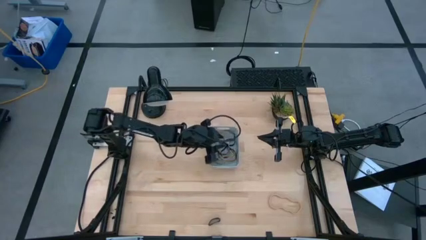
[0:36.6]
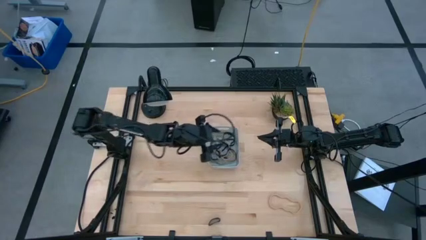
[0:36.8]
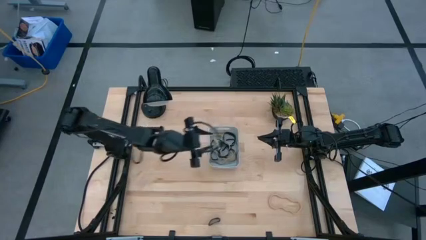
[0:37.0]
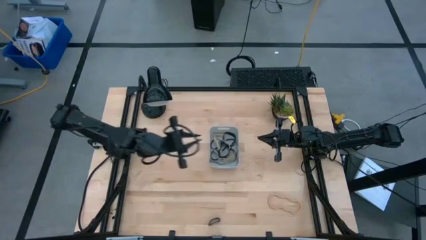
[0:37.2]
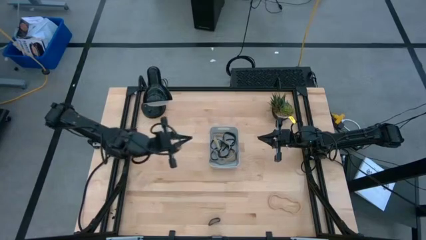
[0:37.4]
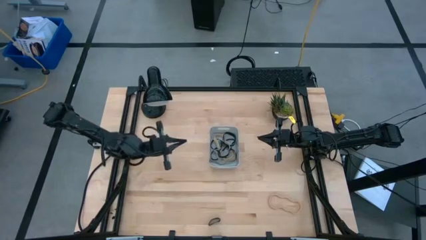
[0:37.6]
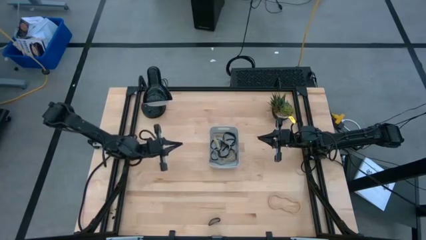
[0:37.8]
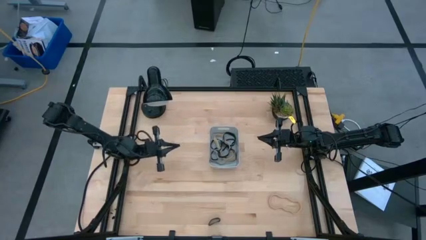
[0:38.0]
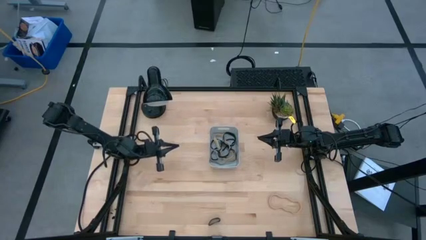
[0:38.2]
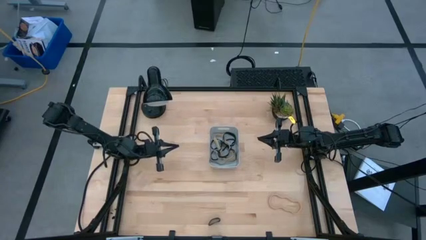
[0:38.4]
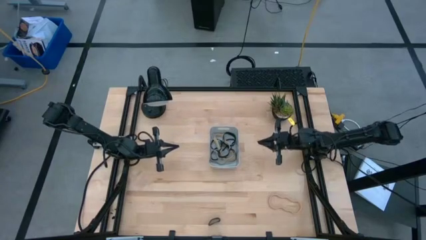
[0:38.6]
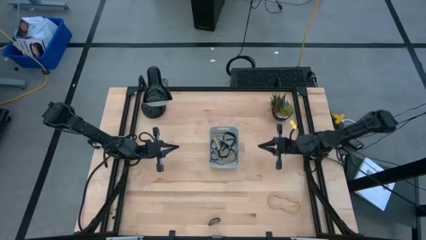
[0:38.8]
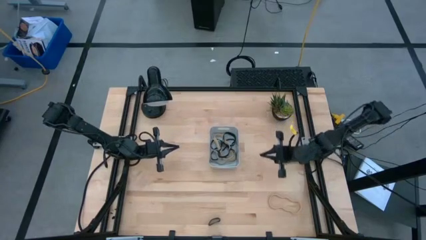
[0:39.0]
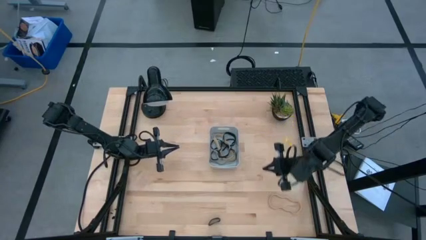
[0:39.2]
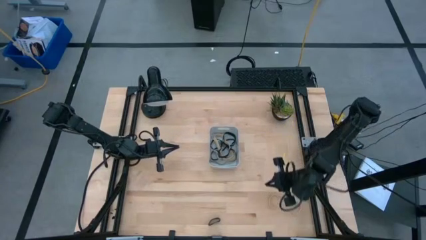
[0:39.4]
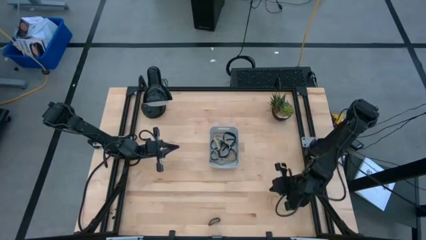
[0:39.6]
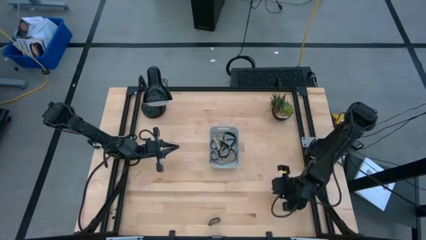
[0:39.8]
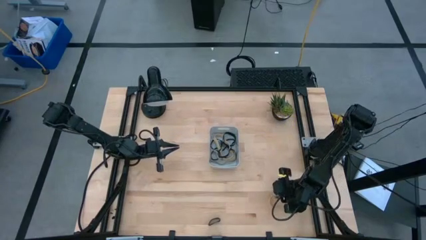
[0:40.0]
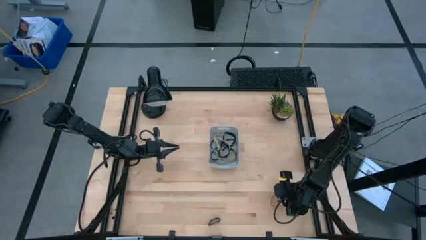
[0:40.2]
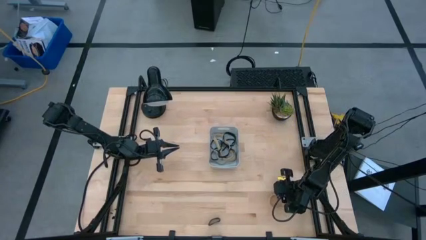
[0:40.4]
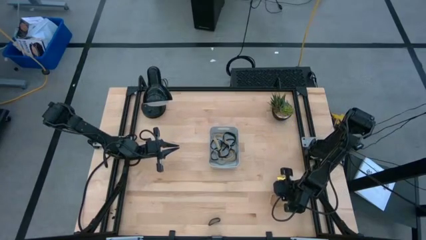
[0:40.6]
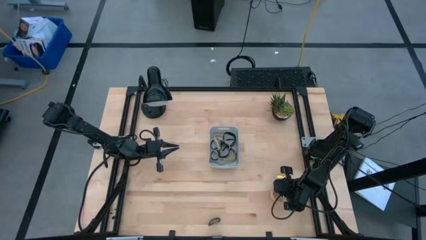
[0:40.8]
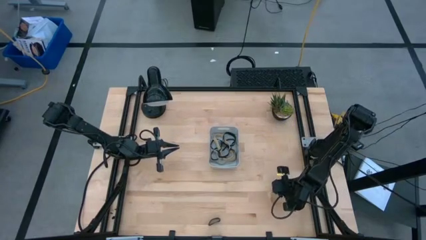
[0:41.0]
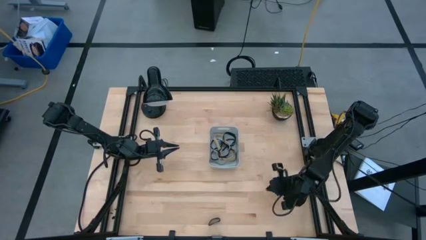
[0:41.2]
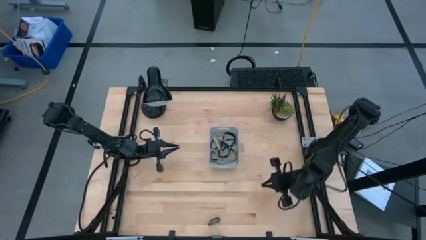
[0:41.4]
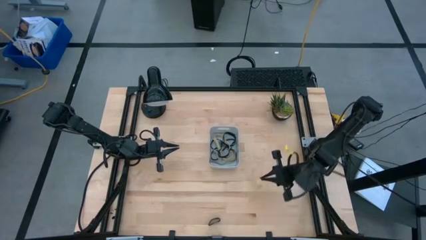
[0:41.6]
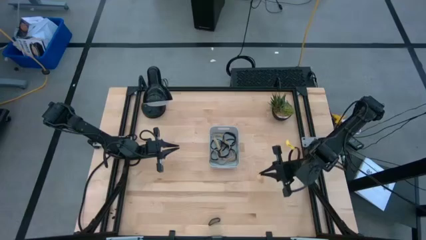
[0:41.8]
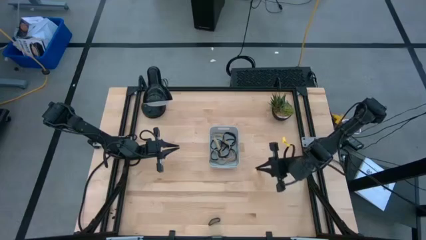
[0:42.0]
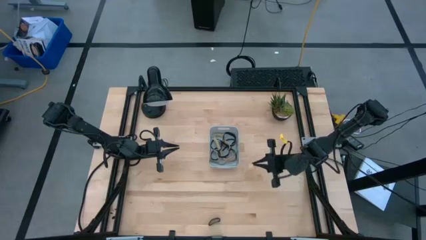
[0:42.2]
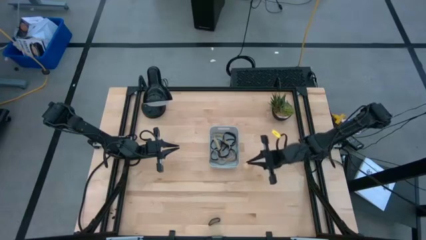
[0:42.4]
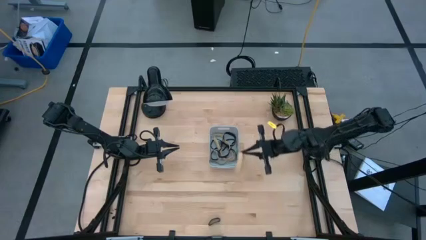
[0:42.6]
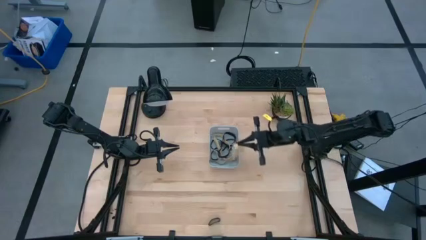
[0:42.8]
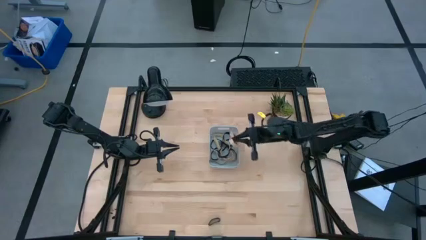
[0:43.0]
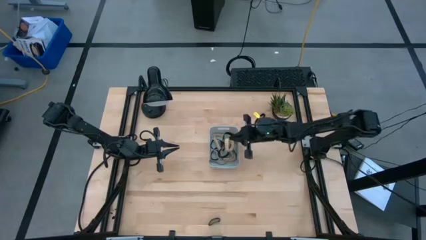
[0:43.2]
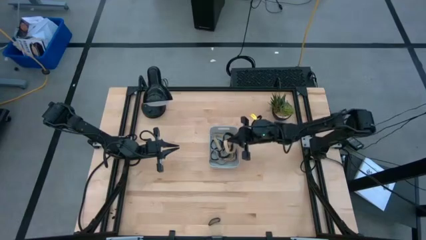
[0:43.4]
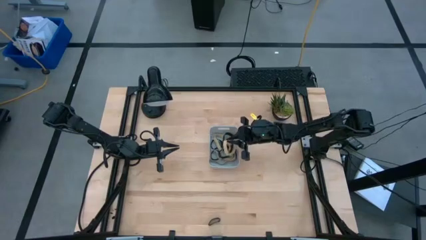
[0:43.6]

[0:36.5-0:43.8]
Task: Pick and place rubber bands into bin
Put the brown rubber band into the gray container

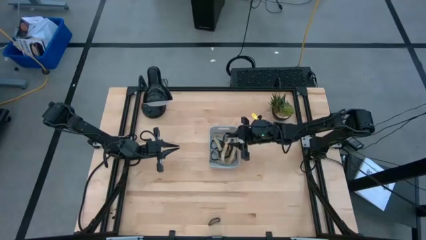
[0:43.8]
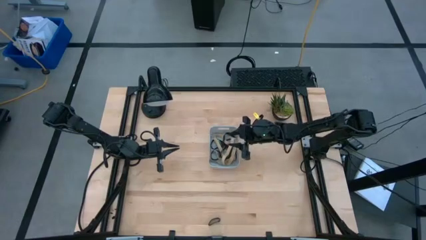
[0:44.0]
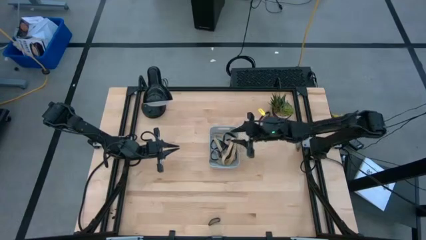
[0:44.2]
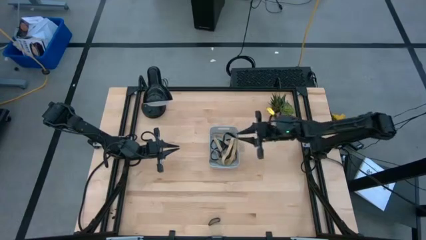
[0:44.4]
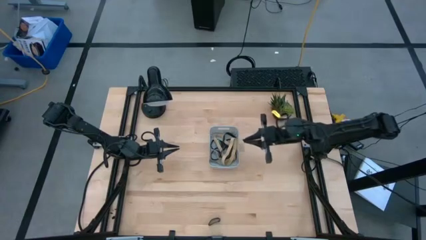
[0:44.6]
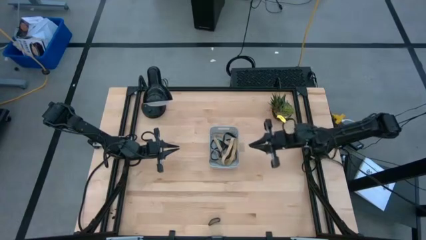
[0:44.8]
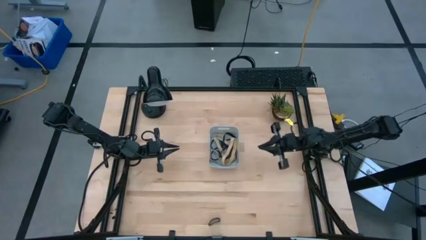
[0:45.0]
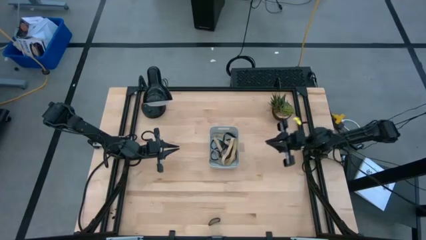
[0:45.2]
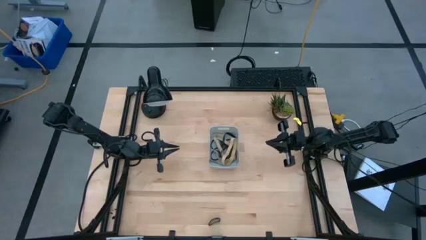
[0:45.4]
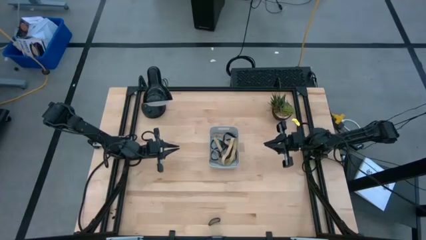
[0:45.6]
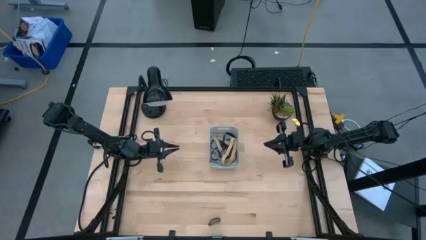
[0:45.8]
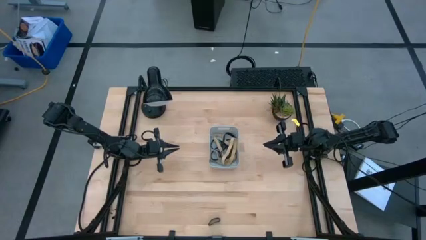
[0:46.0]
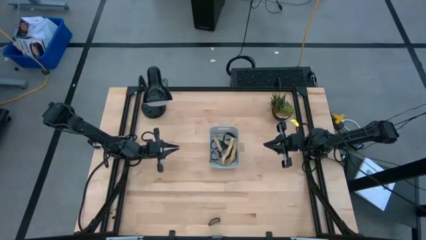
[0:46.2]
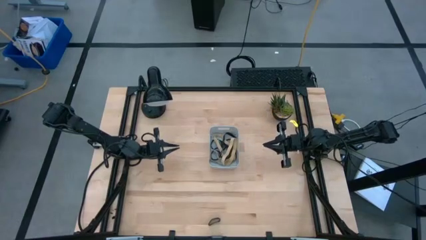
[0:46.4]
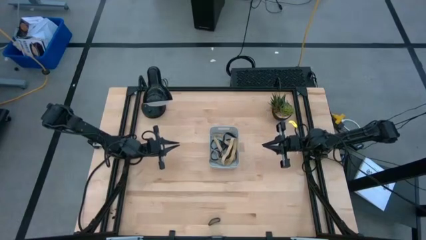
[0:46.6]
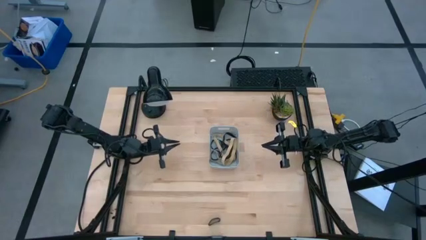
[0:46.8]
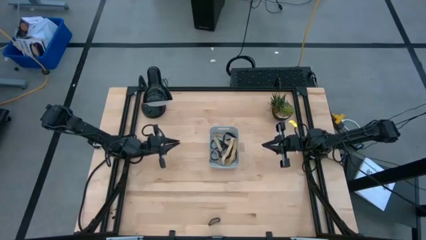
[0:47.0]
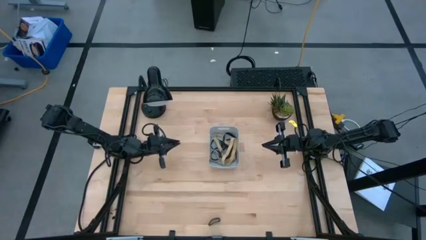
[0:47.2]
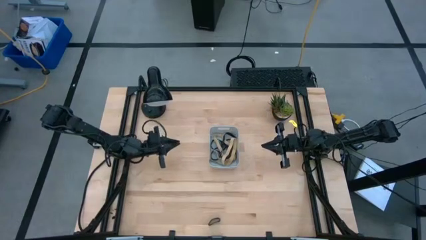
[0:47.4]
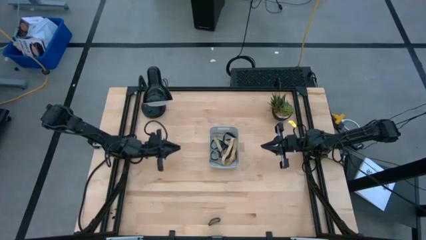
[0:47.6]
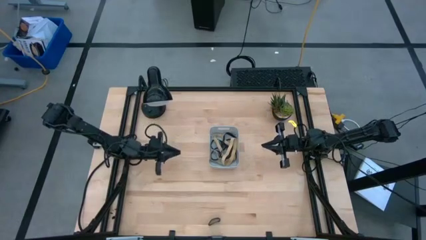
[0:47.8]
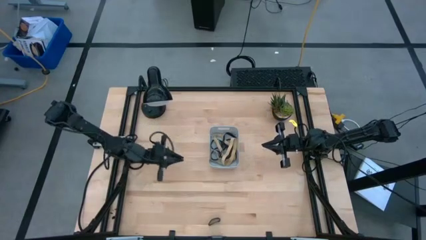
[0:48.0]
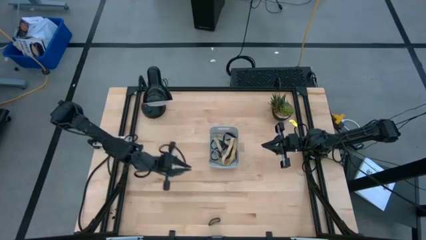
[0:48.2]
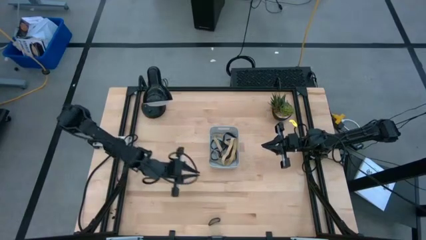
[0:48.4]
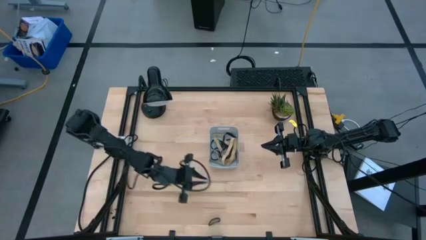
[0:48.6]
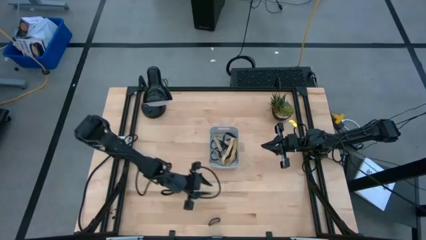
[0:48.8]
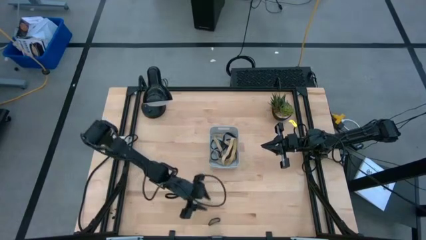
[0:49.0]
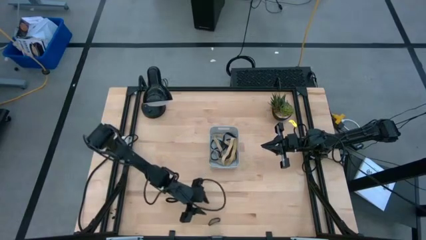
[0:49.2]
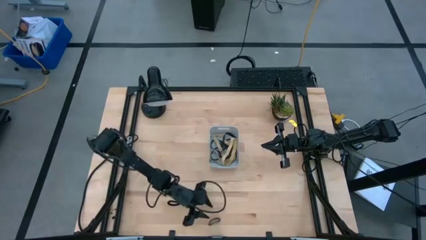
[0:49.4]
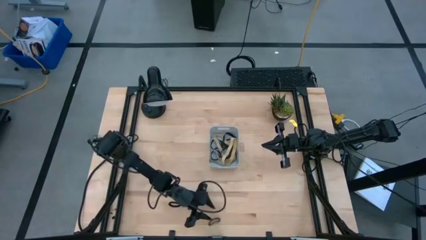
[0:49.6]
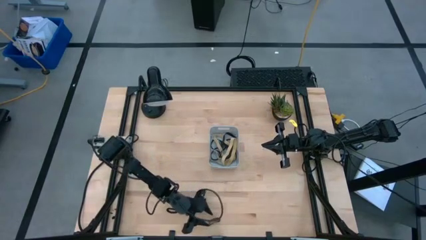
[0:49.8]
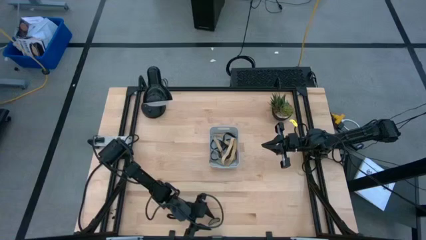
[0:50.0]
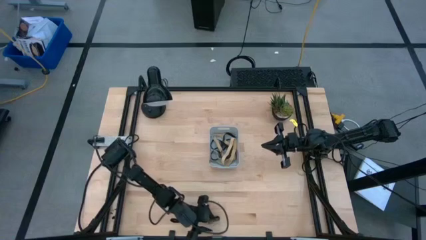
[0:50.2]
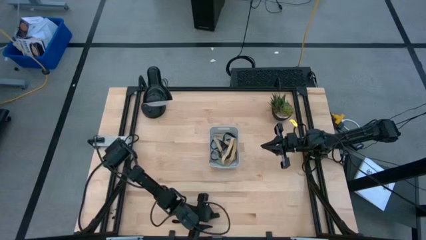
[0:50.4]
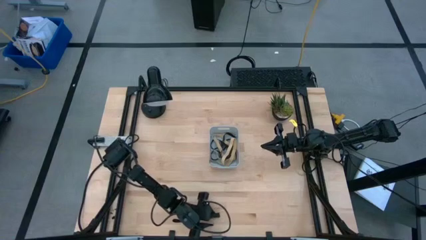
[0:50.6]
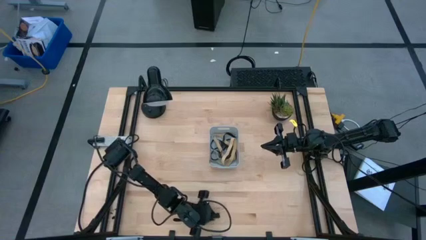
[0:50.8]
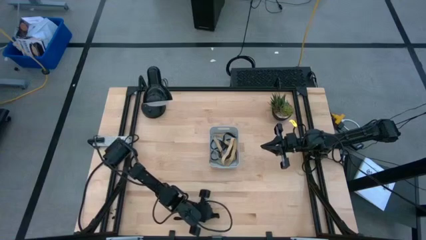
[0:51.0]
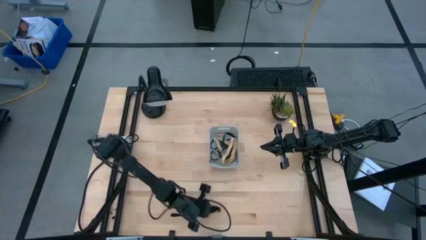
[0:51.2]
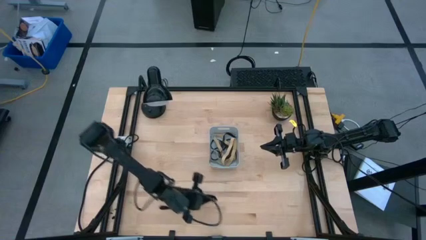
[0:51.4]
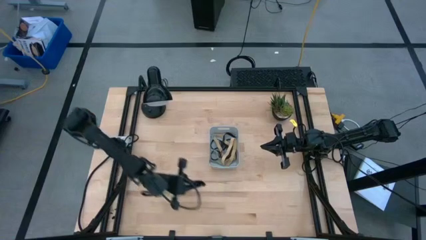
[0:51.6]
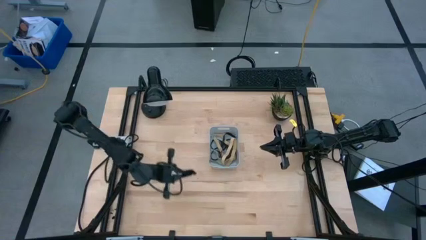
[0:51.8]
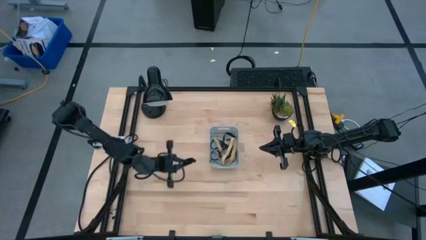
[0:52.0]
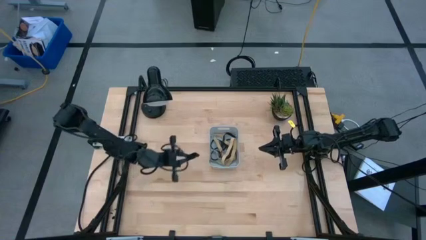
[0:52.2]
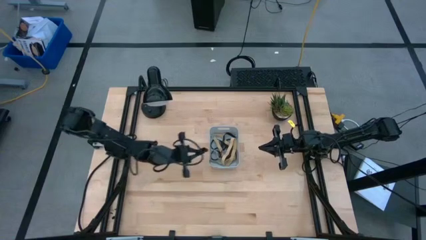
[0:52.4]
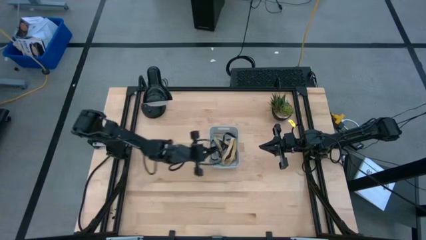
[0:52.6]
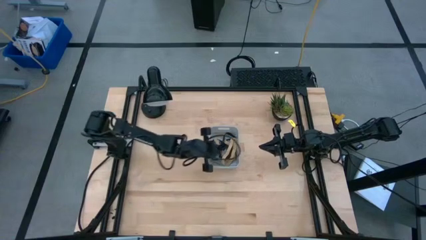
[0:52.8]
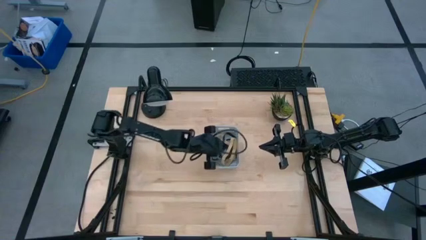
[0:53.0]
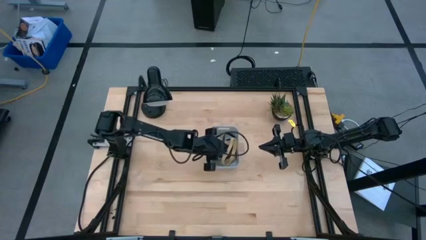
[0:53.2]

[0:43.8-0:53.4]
Put the black rubber band into the gray container
